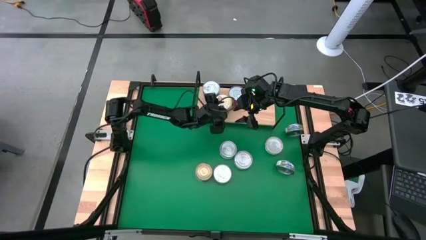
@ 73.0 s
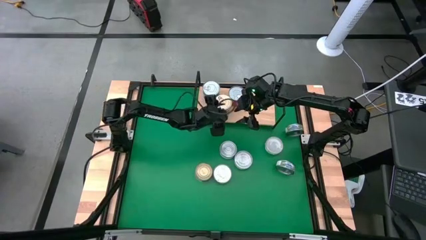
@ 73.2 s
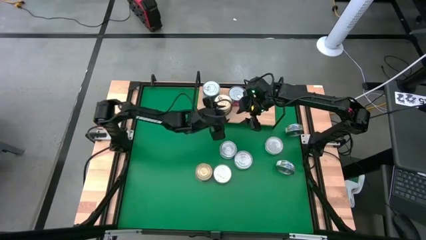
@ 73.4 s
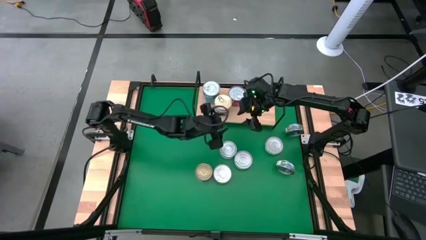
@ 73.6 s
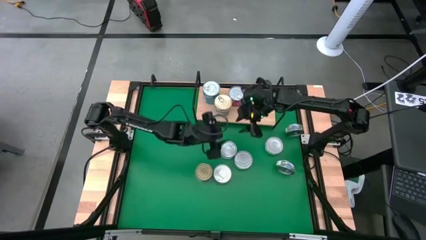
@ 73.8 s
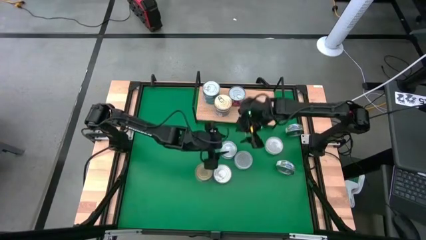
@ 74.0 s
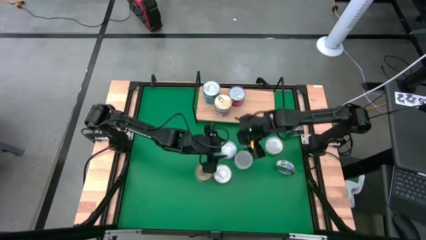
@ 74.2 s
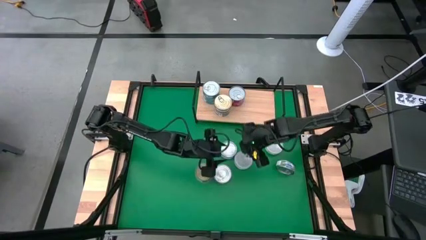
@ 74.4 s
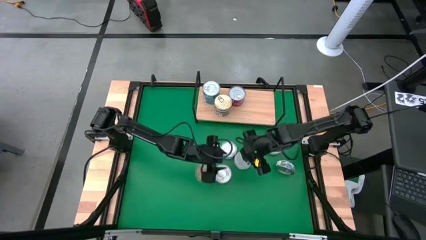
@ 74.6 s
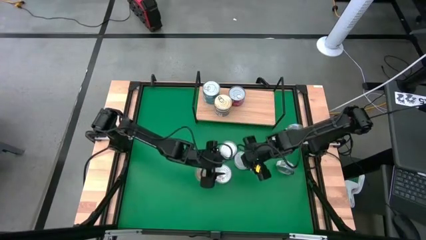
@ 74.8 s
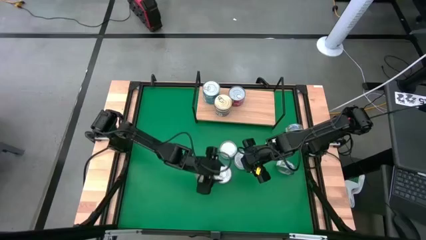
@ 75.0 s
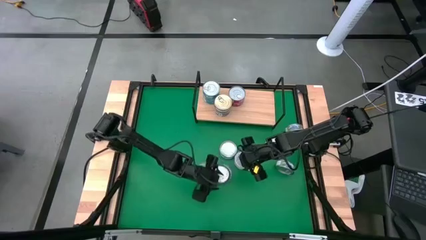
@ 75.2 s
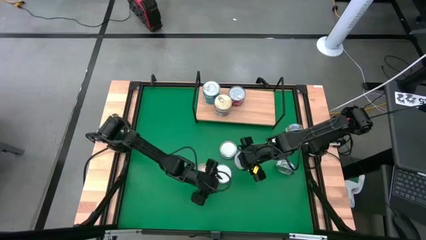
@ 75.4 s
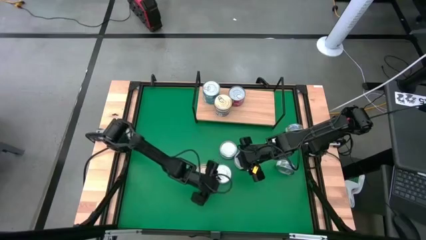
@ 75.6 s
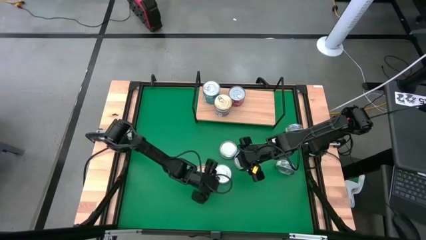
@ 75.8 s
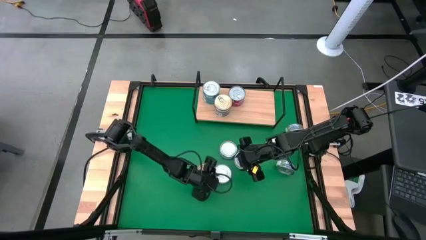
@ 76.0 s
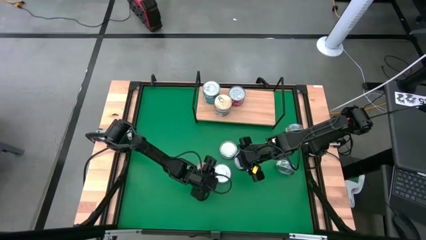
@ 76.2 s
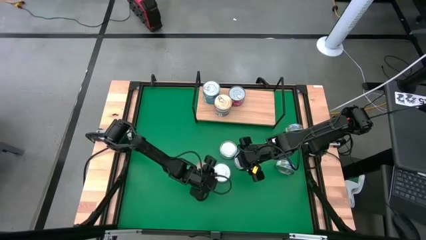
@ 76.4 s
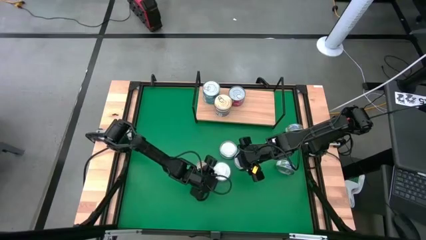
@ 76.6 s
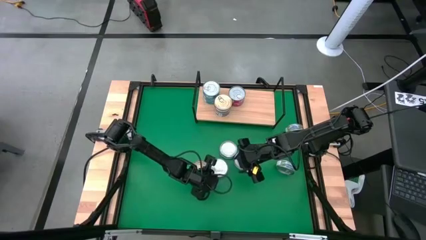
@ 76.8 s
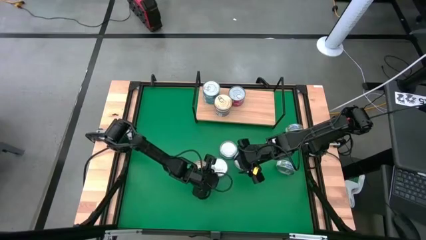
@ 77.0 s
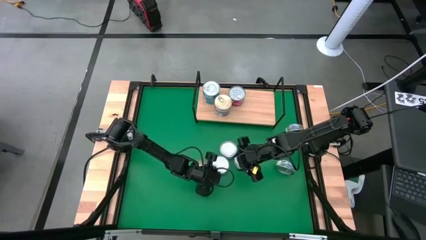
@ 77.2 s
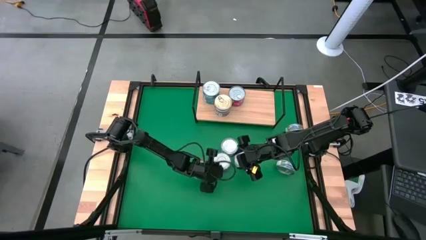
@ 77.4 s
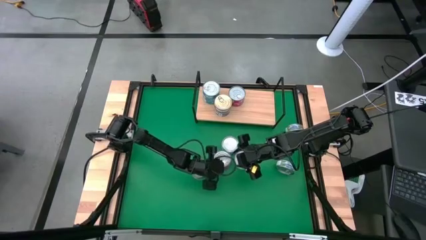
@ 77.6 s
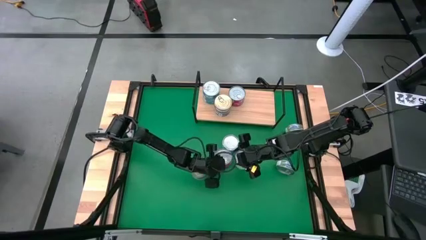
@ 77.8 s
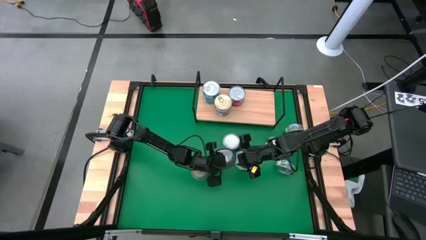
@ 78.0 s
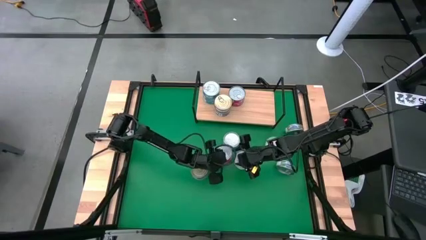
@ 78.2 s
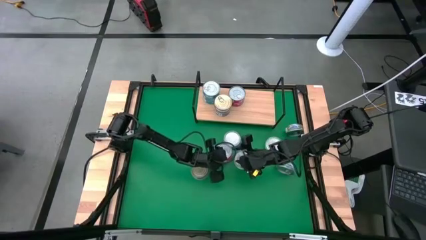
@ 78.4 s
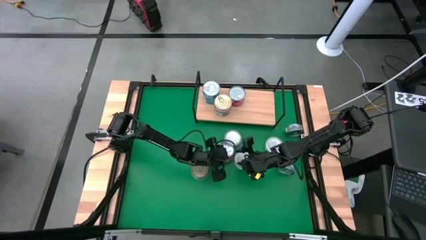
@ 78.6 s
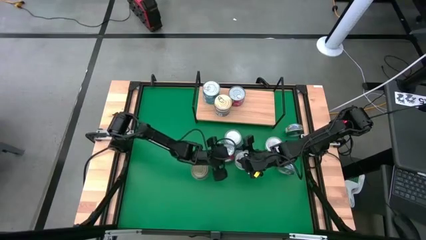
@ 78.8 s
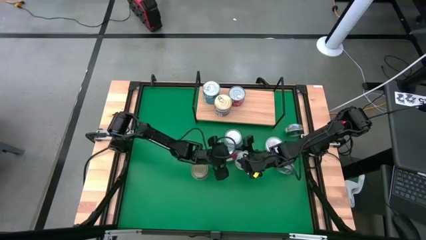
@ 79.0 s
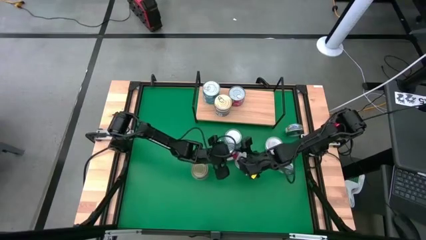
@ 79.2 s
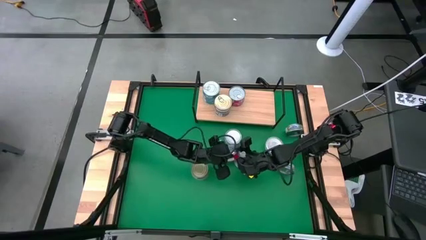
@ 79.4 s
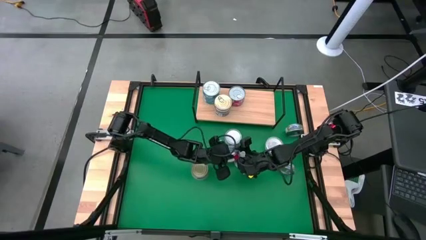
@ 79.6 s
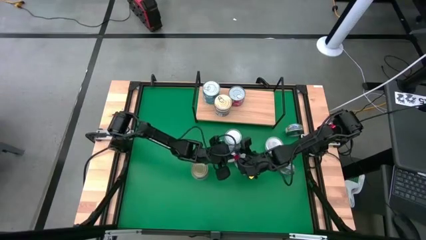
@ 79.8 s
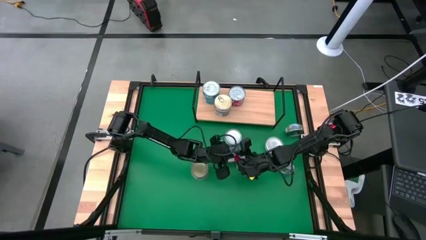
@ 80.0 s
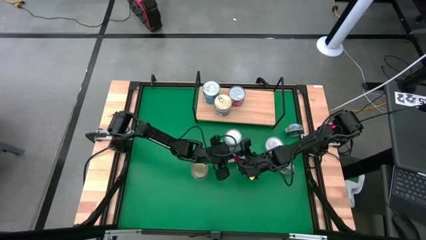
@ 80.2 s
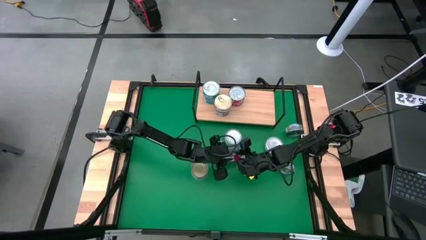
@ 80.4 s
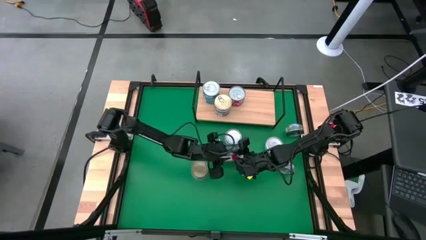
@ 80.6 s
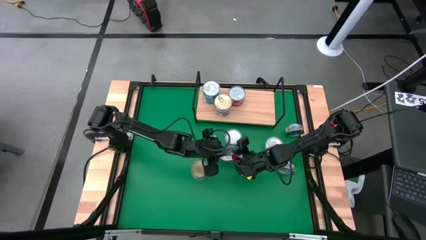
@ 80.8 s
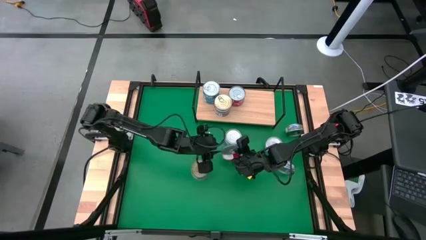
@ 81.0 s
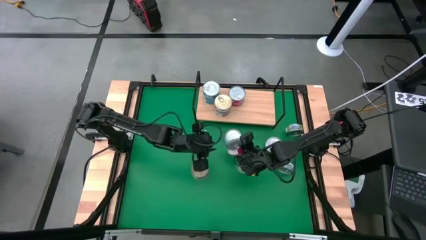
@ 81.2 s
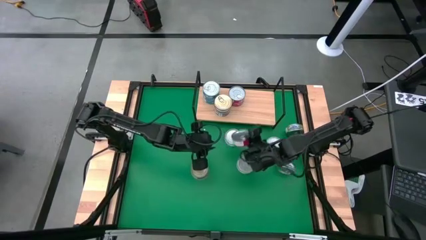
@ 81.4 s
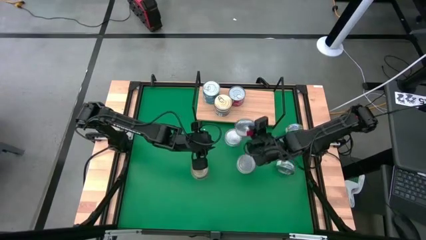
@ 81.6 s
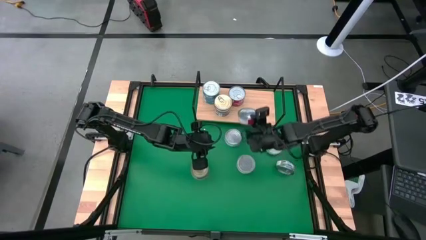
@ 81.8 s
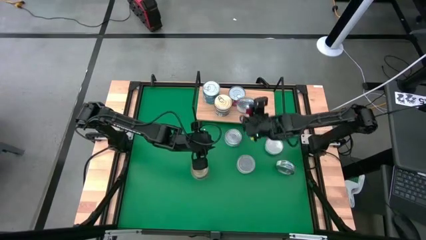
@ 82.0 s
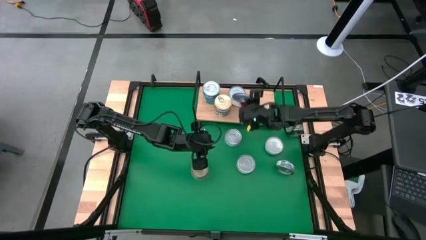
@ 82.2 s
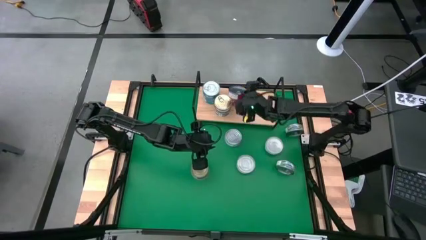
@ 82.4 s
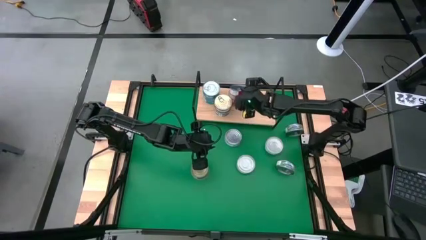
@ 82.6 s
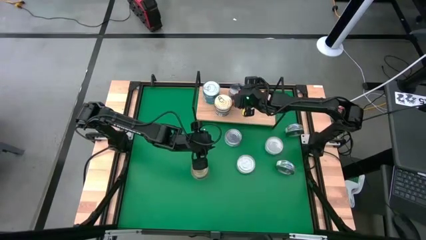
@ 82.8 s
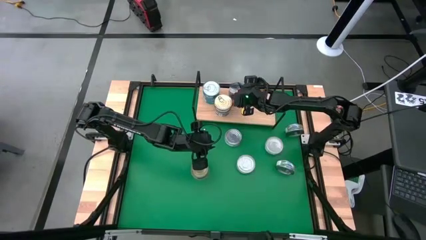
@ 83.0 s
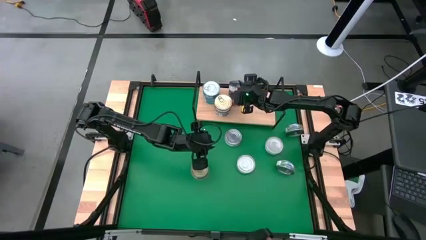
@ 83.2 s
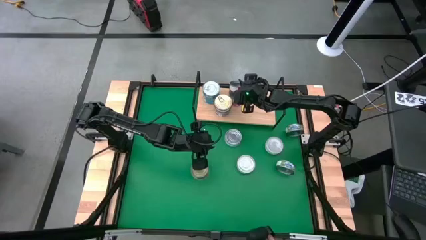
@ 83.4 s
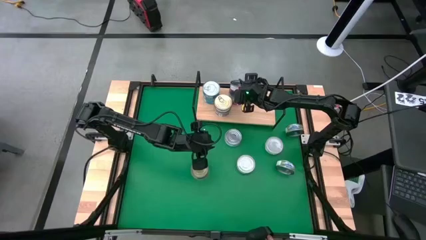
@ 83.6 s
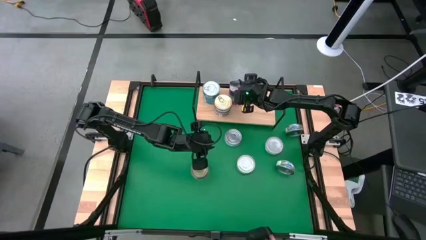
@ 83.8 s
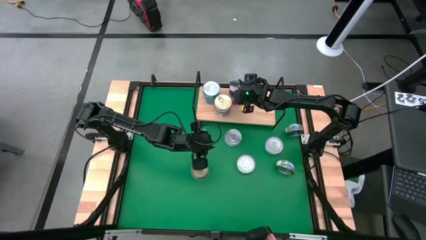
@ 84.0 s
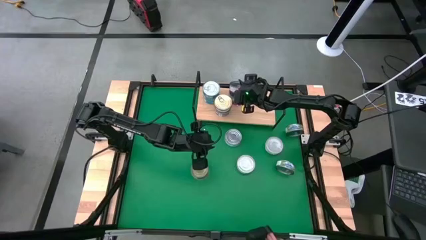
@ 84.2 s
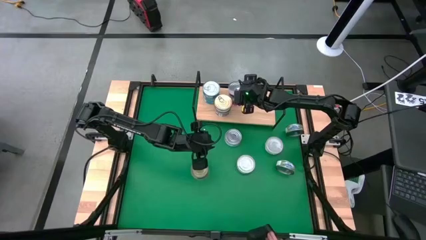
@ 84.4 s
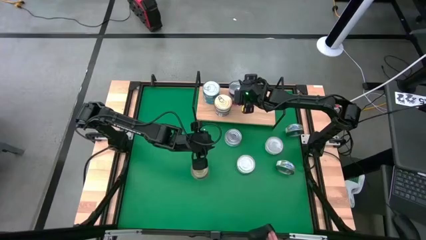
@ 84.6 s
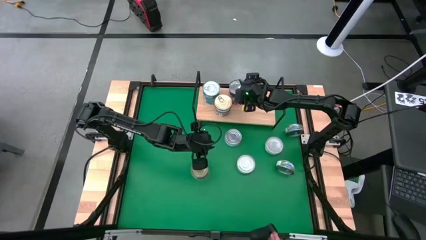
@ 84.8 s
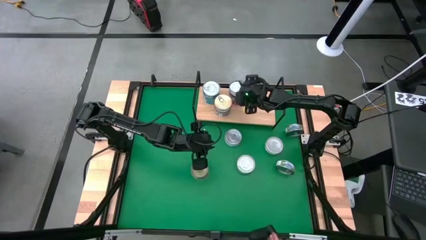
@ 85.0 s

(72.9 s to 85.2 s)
Task: Stack canned seafood by type on shelf
Stack the red tuna can on top of the red tuna can on the shelf

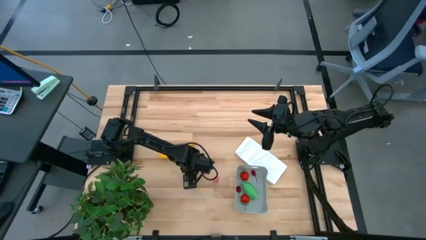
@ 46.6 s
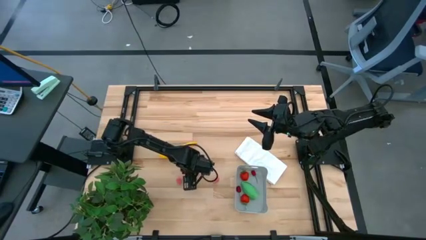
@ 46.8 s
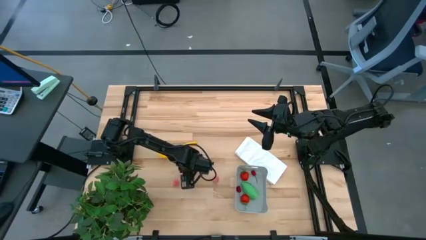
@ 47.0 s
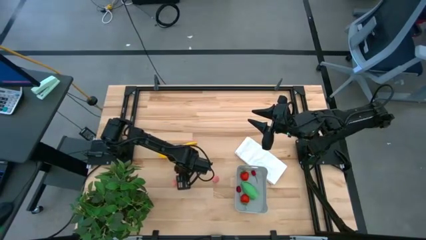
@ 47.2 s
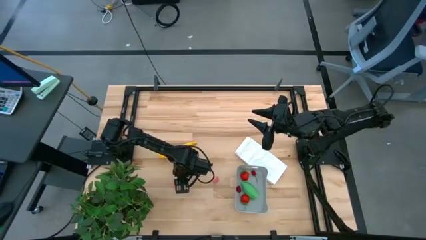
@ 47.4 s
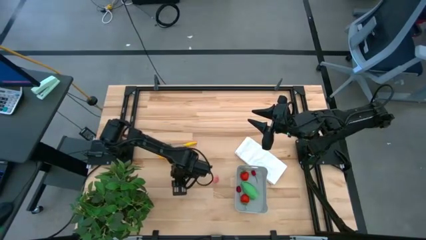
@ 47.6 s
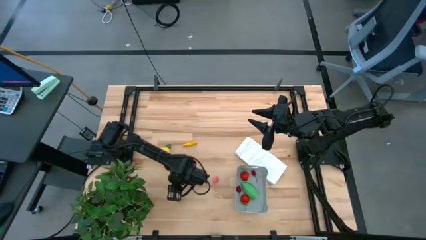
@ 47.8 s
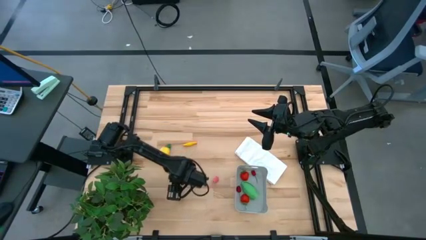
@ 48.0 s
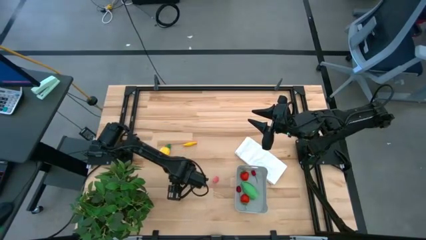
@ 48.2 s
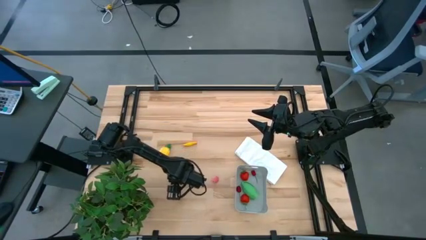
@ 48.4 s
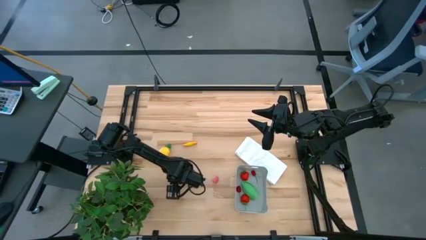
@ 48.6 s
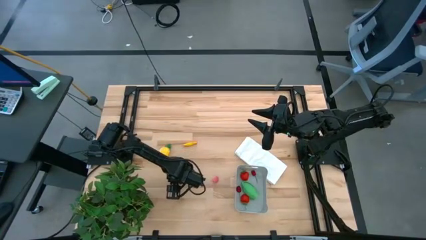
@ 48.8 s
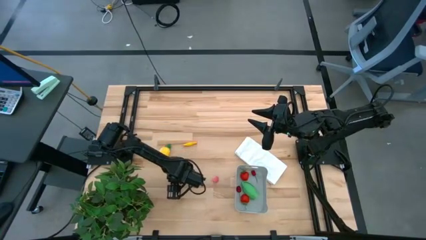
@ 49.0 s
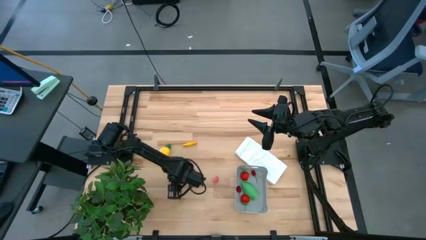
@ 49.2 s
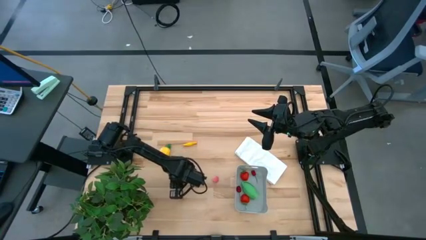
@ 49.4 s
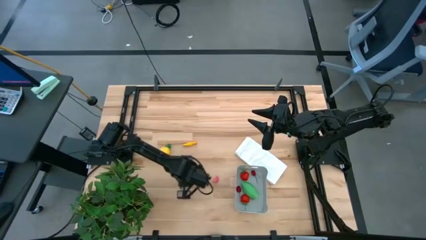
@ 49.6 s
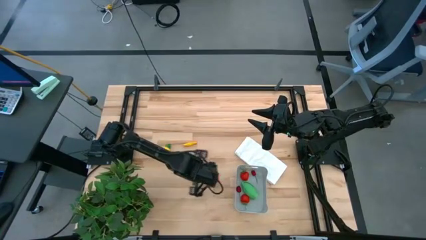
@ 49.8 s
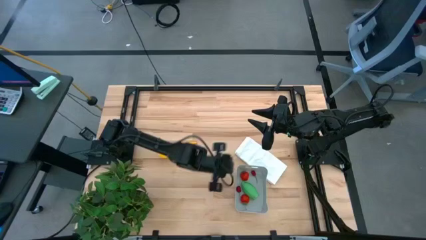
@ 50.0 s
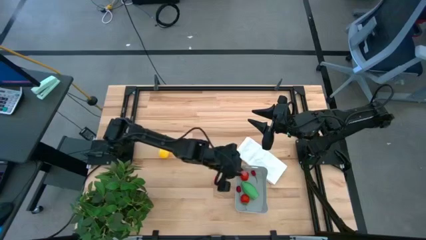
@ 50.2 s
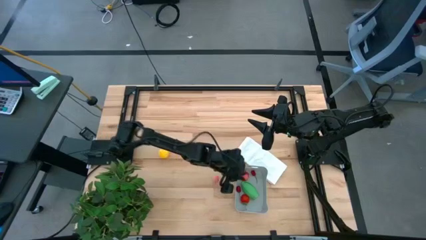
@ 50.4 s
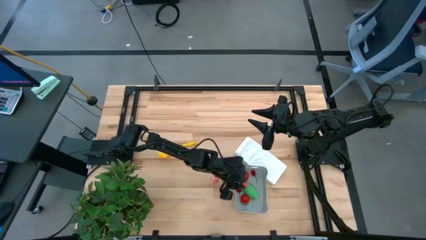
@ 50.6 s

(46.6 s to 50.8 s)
Task: Pick and placing Produce into tupperware
Put the left pink peach into the gray bin
